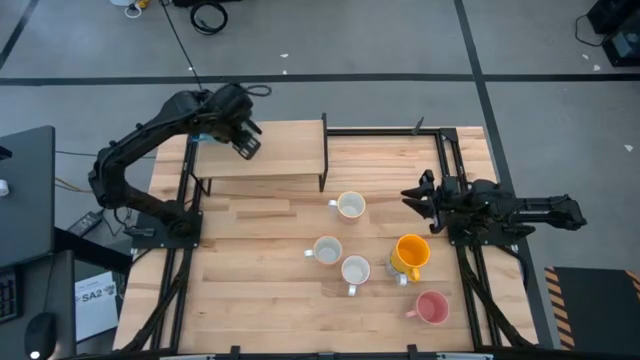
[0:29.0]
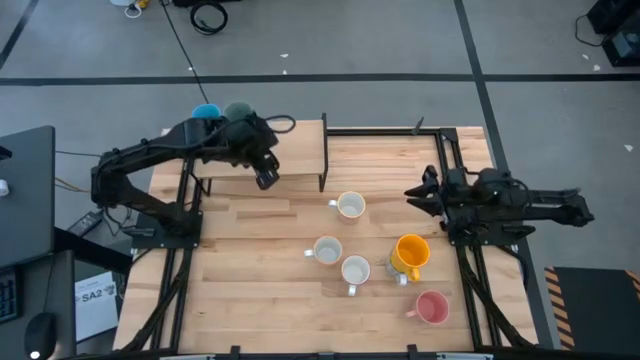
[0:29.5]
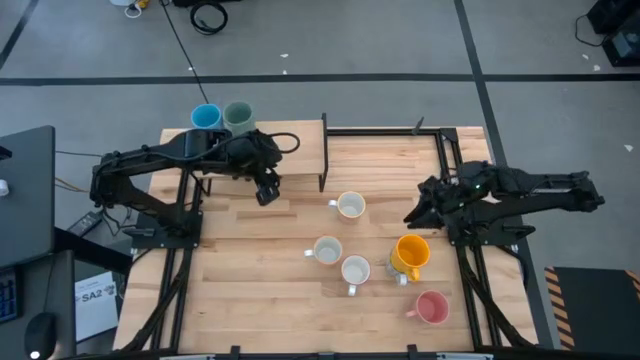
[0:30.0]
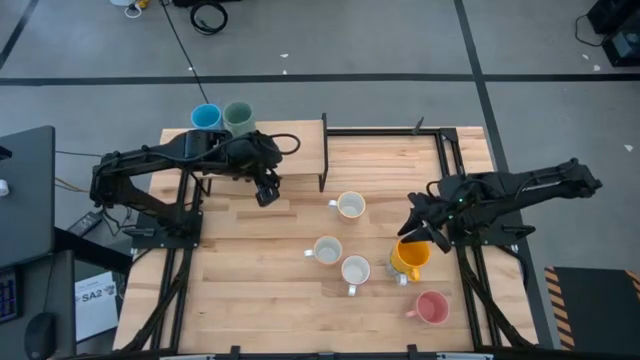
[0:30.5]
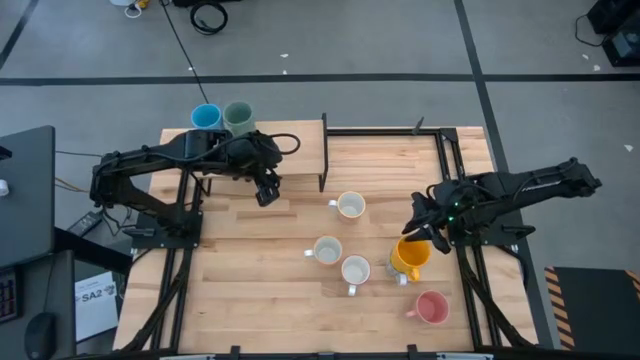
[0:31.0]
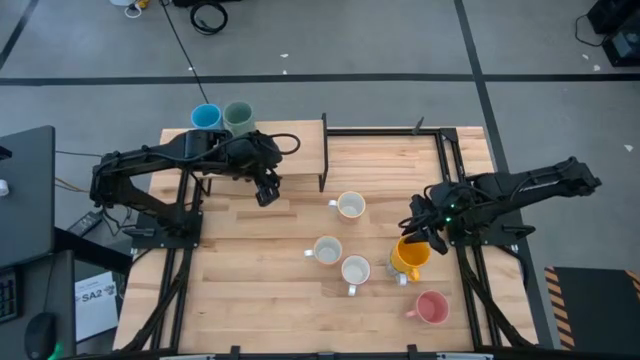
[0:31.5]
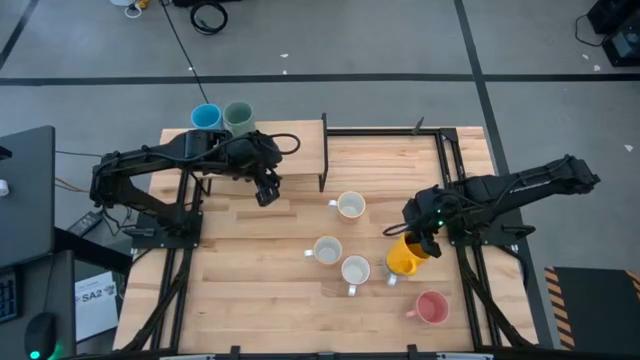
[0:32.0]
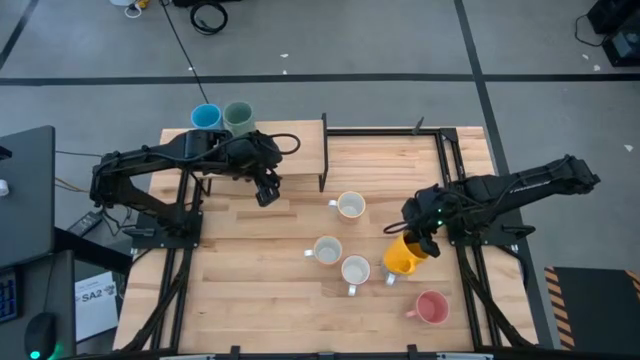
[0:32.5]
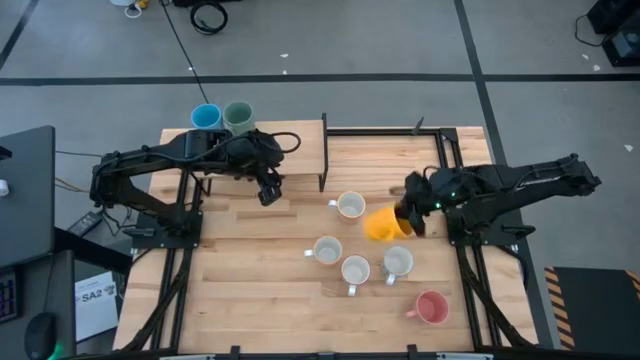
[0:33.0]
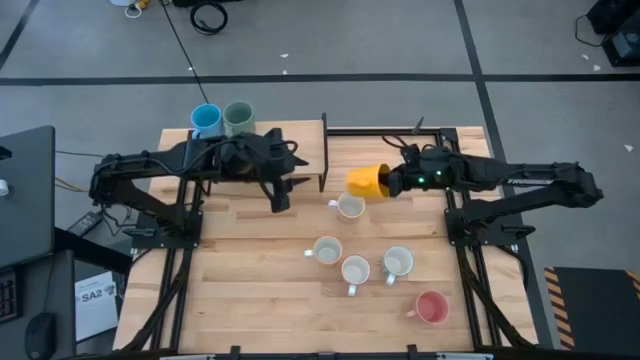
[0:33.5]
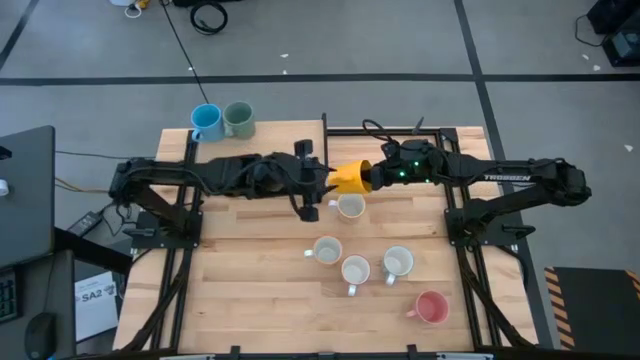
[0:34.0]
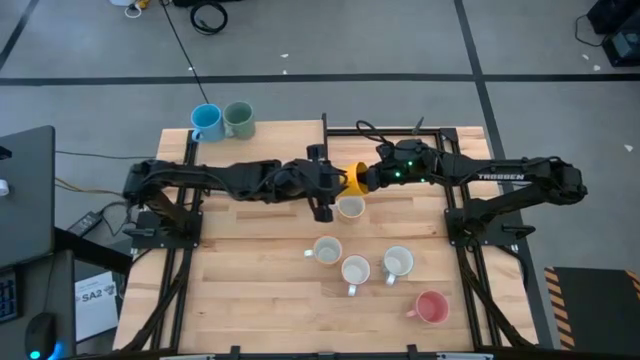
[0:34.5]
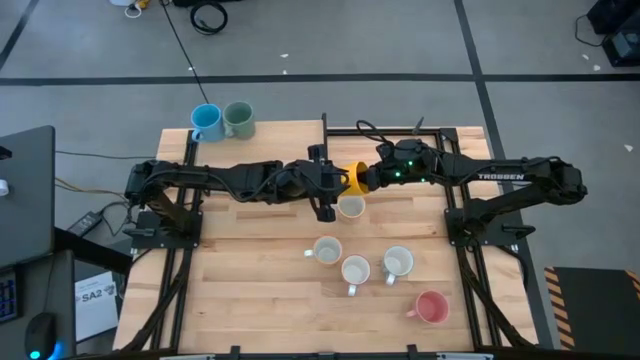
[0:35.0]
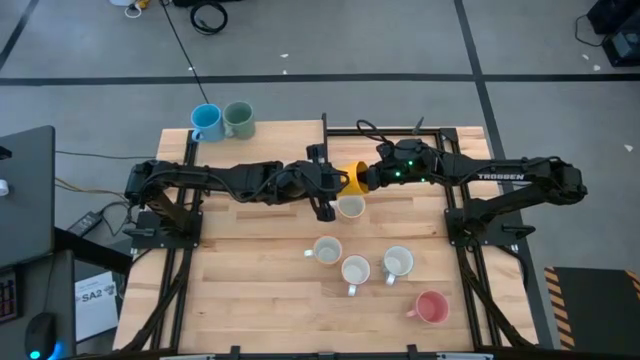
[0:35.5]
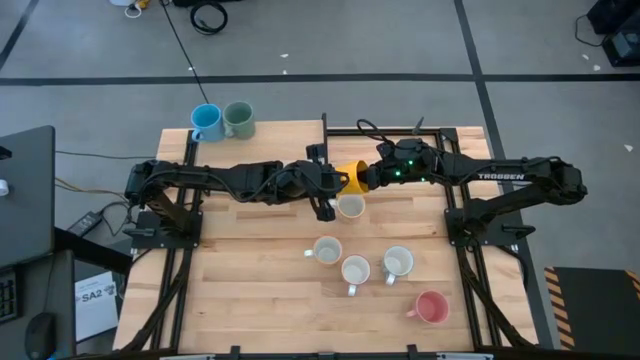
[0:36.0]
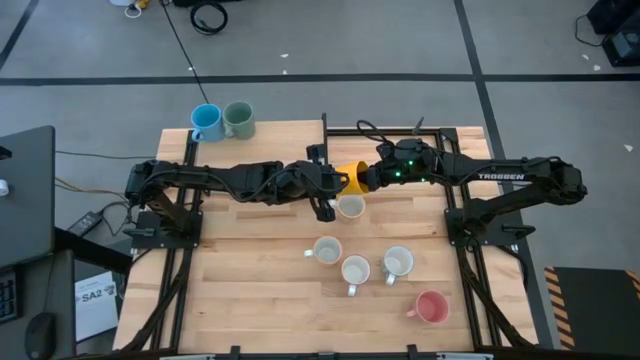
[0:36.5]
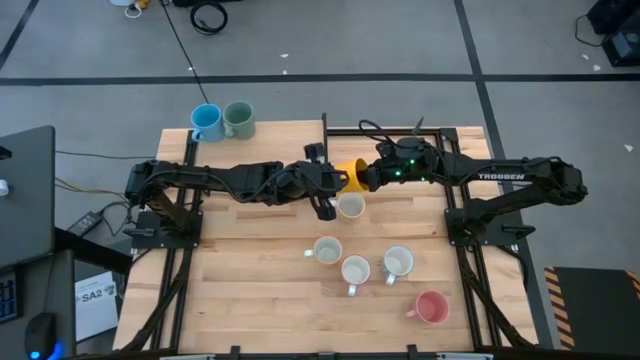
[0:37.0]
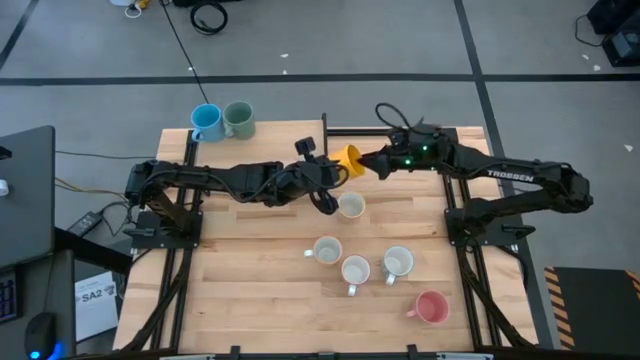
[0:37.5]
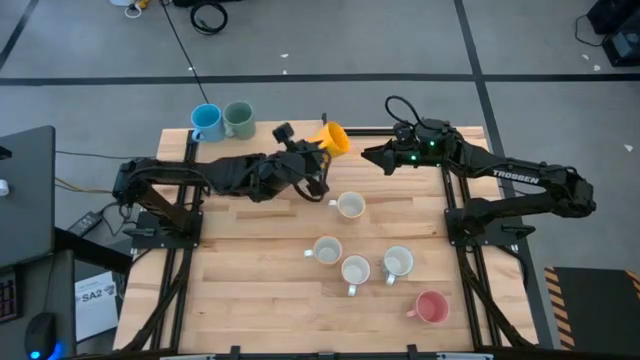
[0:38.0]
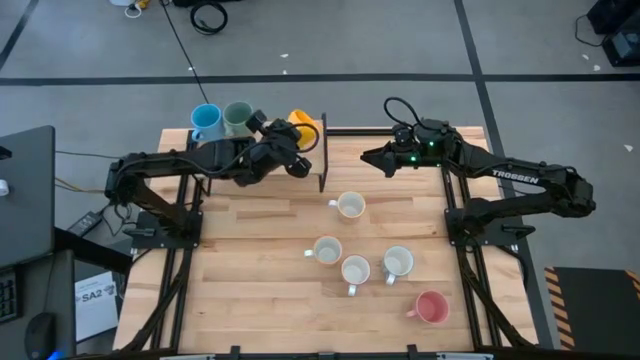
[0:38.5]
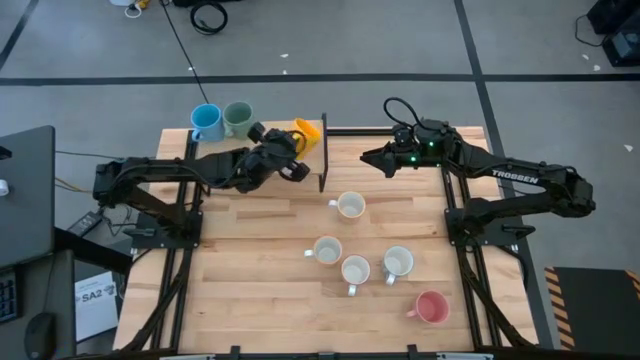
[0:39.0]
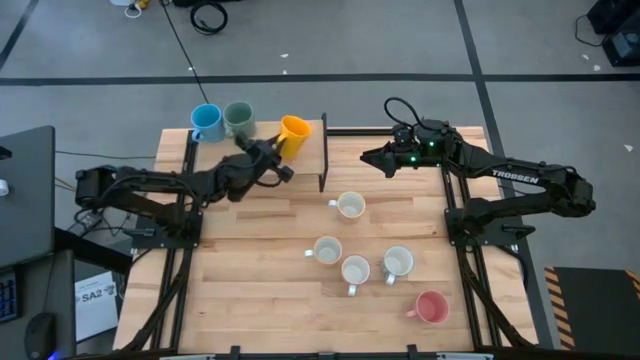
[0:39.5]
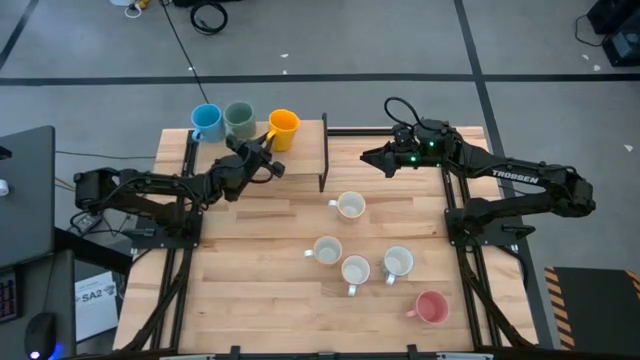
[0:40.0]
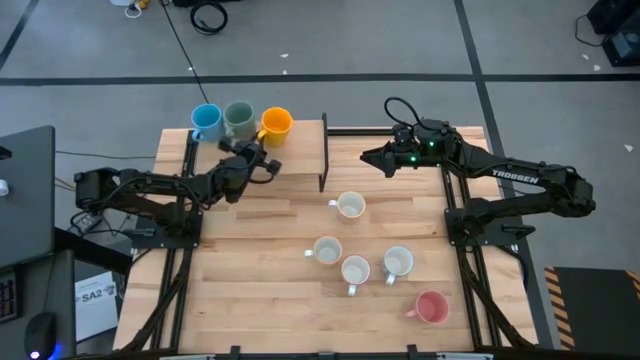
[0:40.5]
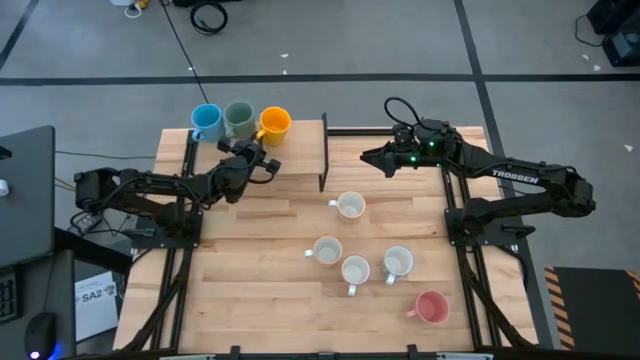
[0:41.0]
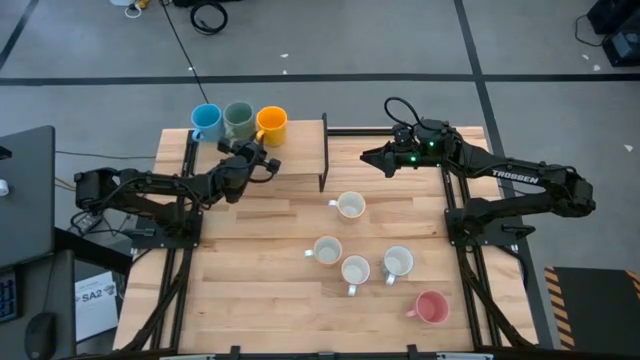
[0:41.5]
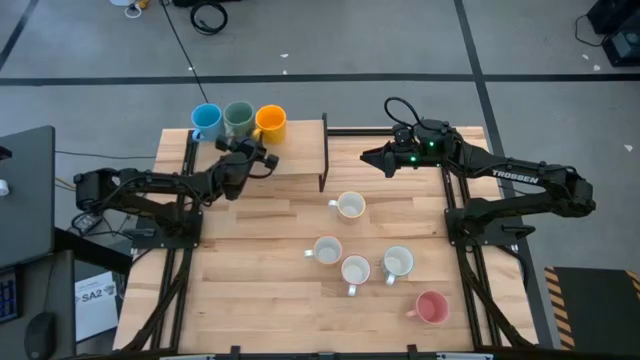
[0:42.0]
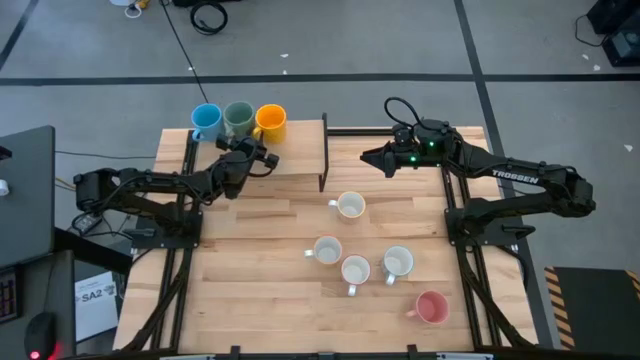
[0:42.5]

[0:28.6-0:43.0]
Task: Place coffee mugs
Put the yellow mug on the shelf

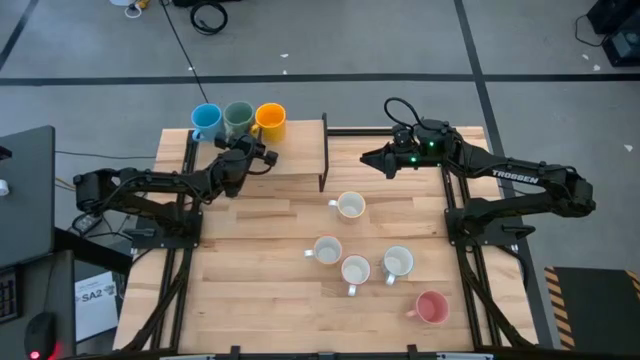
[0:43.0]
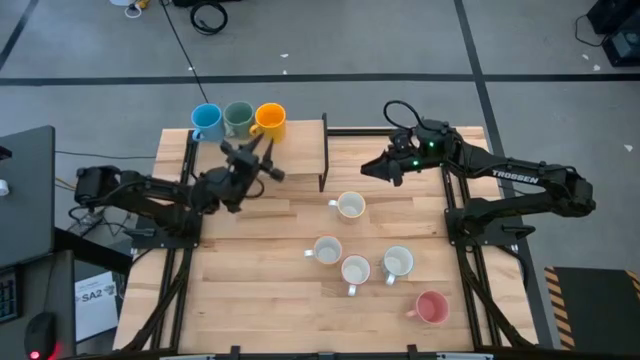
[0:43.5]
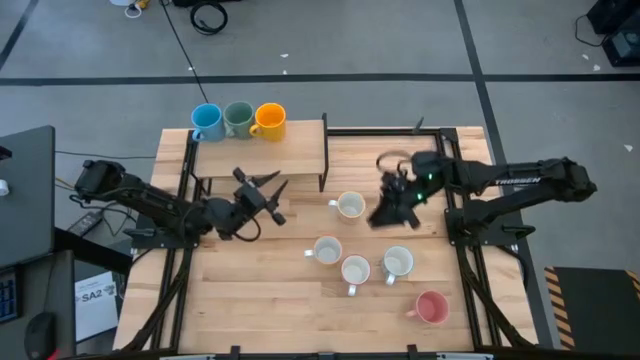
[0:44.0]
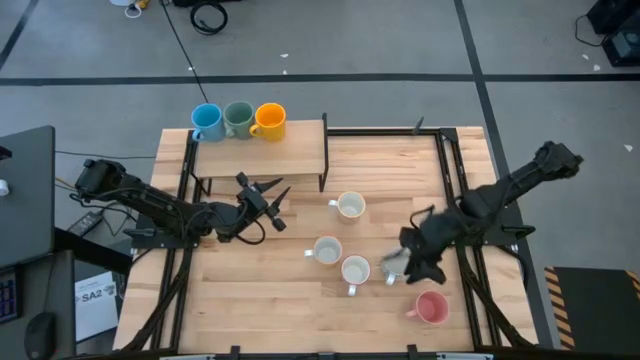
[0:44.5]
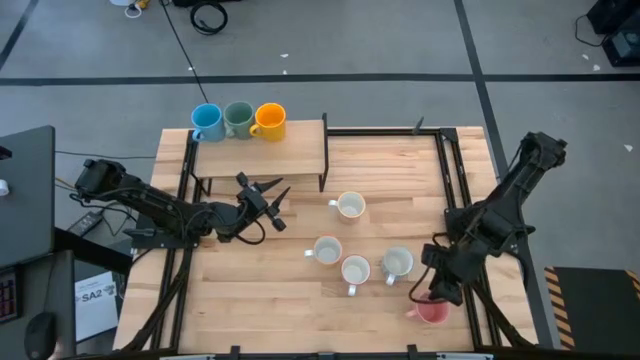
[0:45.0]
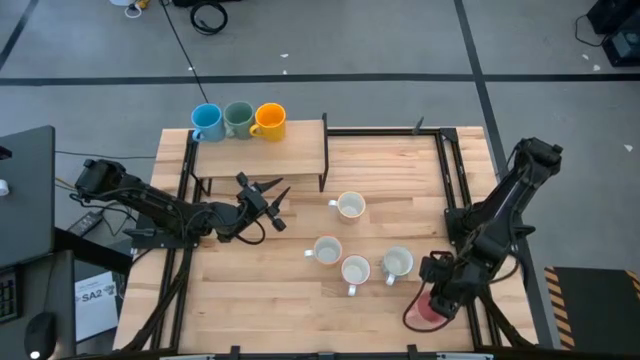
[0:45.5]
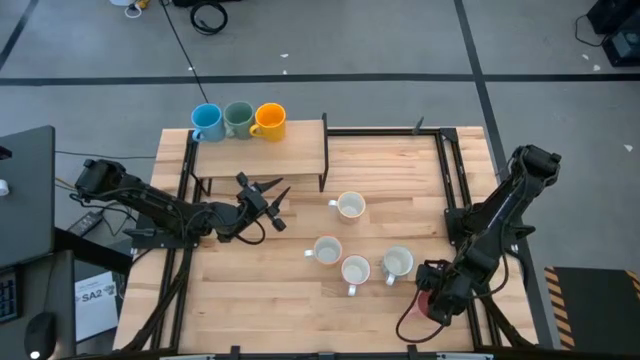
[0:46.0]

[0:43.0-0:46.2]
Put the pink mug on the shelf

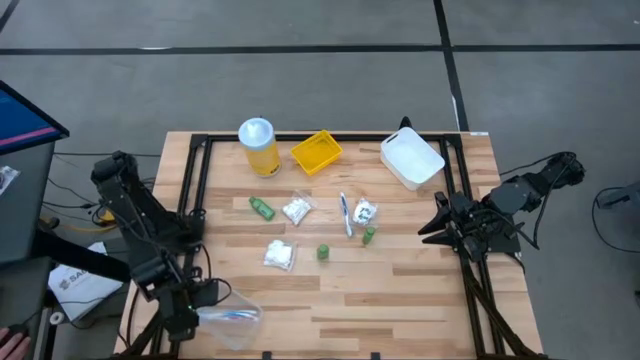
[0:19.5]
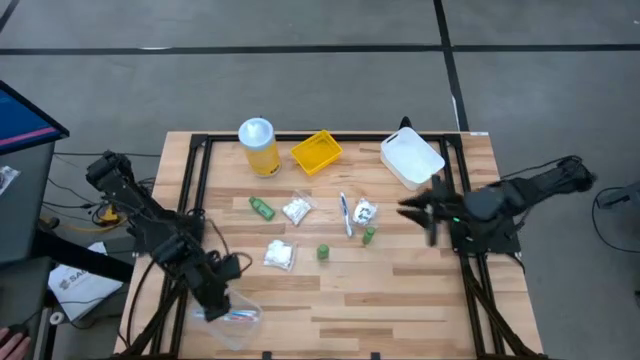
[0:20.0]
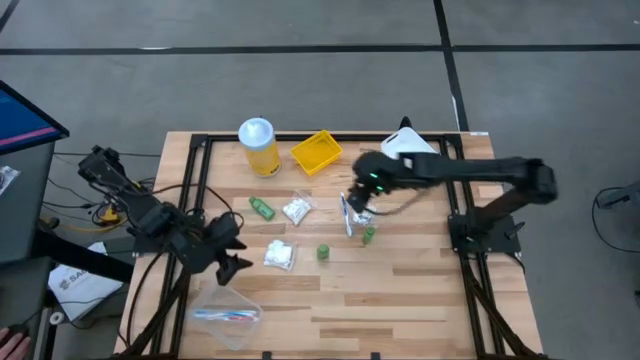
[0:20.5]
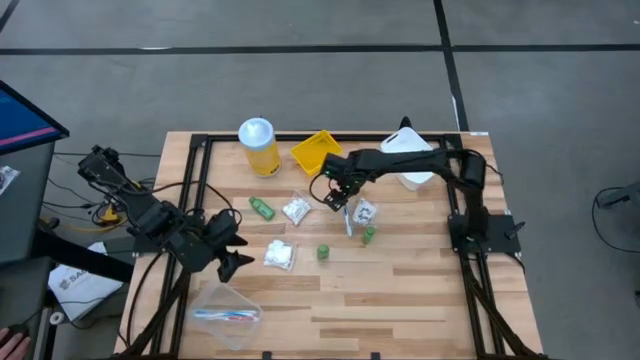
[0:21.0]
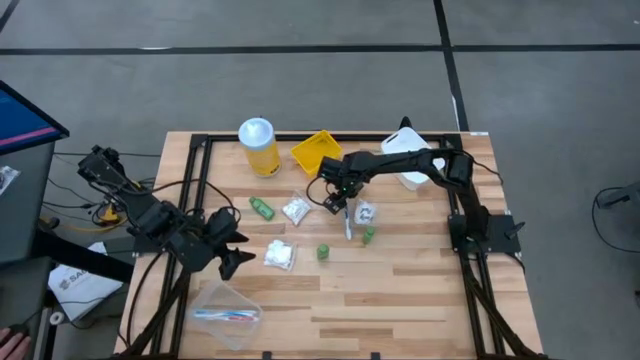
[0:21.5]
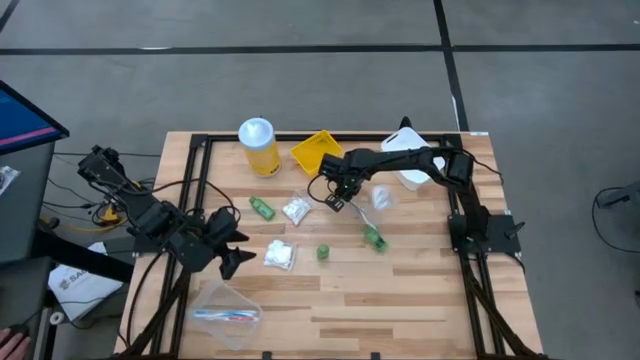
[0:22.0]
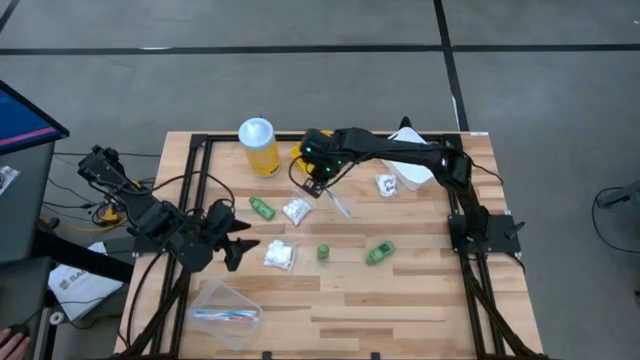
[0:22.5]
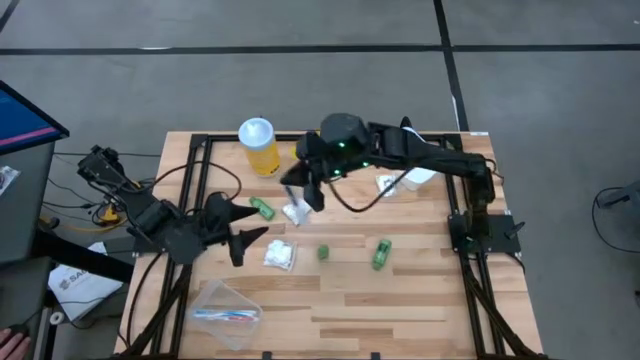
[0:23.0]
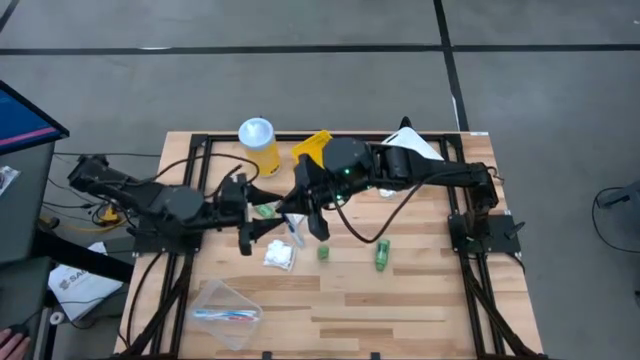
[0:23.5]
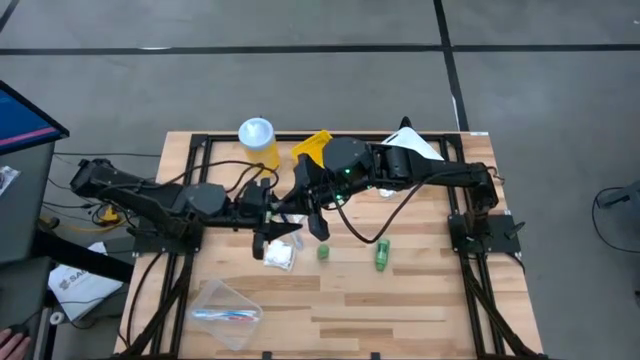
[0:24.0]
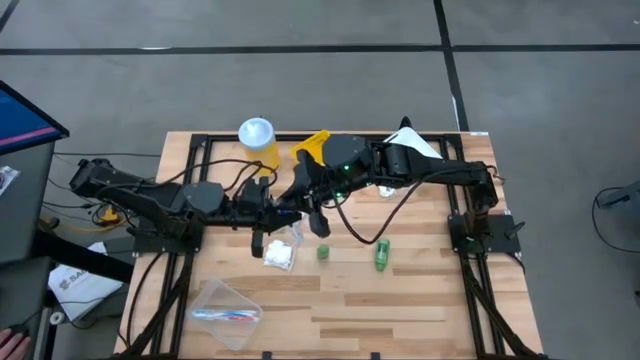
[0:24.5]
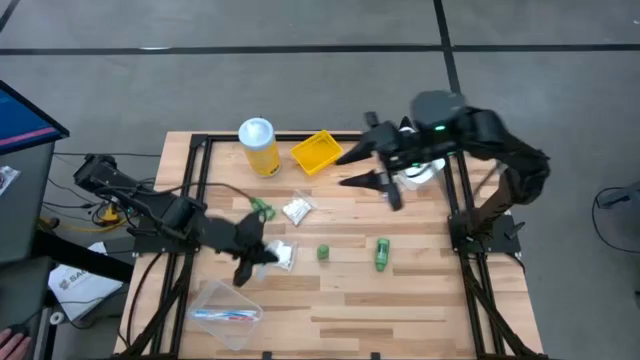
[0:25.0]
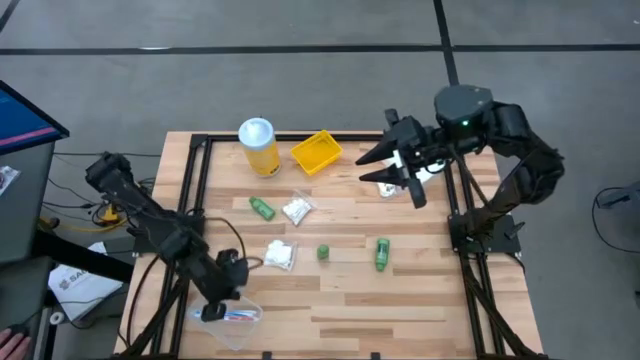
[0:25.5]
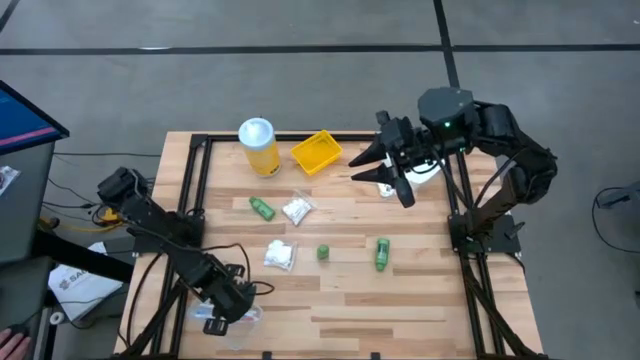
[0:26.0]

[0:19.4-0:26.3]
Task: Pick & Place Travel size toiletries
Put the blue toothbrush into the transparent bin
